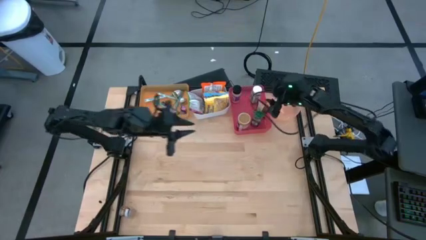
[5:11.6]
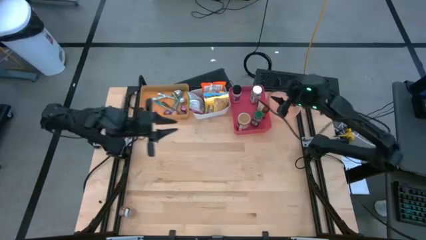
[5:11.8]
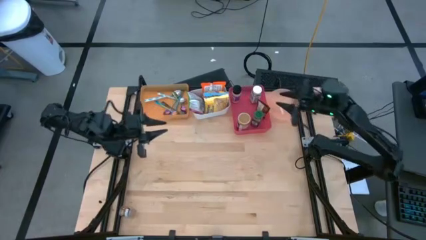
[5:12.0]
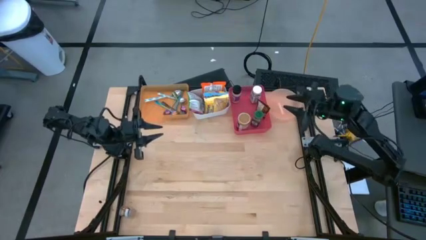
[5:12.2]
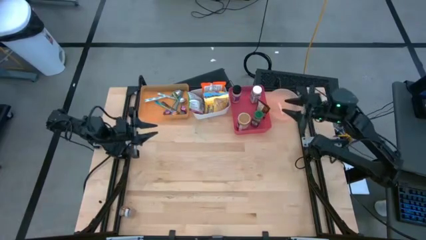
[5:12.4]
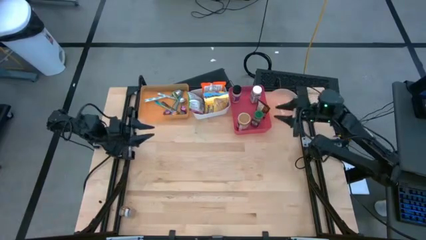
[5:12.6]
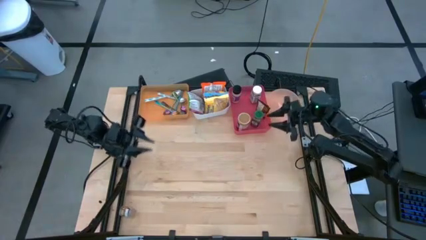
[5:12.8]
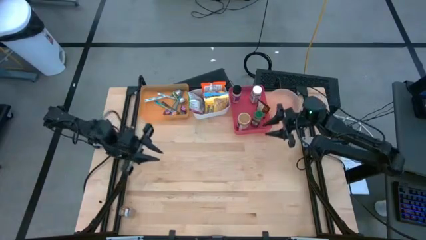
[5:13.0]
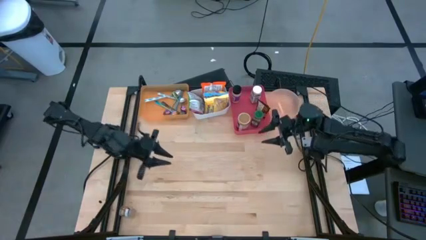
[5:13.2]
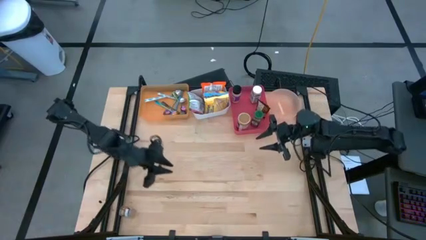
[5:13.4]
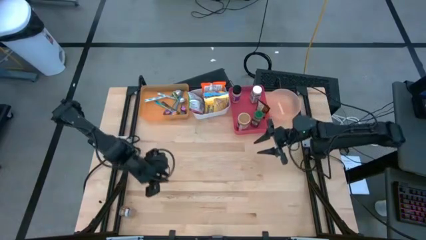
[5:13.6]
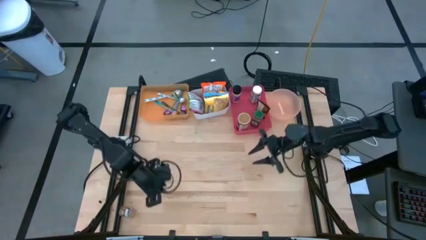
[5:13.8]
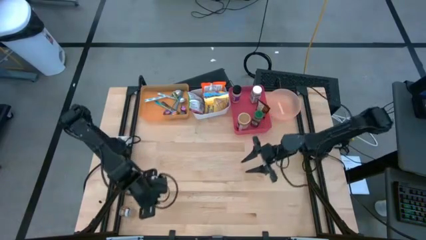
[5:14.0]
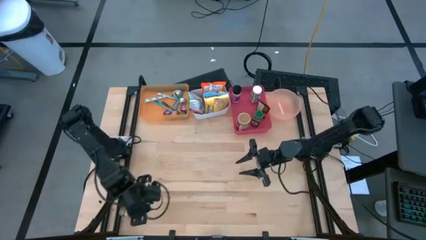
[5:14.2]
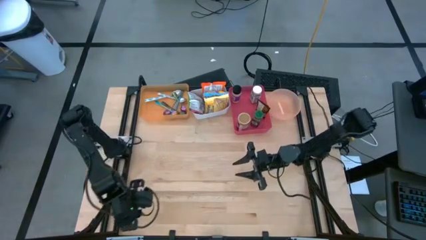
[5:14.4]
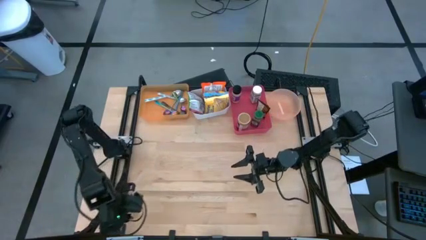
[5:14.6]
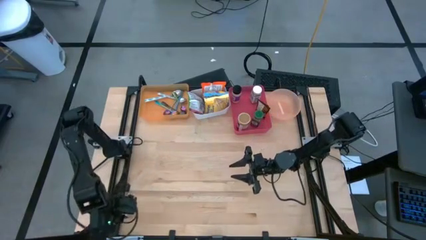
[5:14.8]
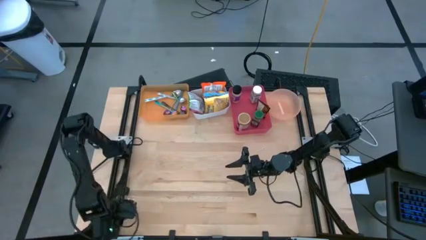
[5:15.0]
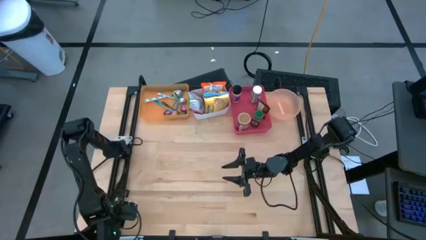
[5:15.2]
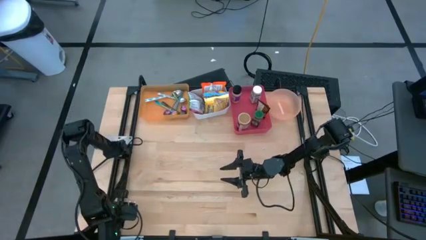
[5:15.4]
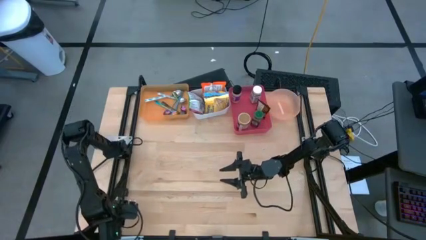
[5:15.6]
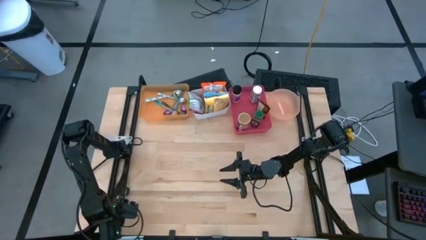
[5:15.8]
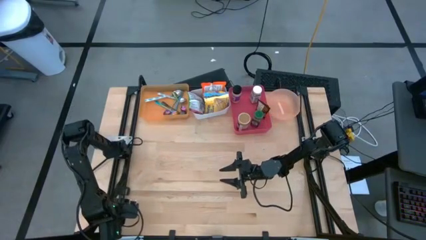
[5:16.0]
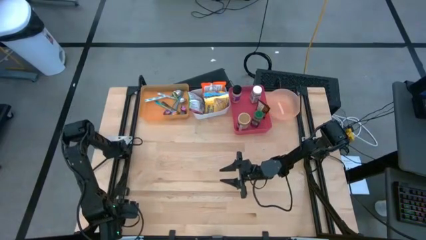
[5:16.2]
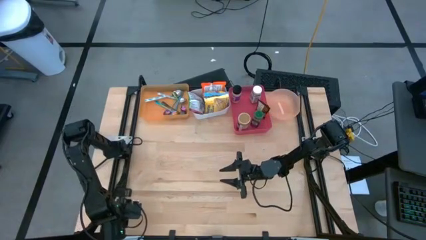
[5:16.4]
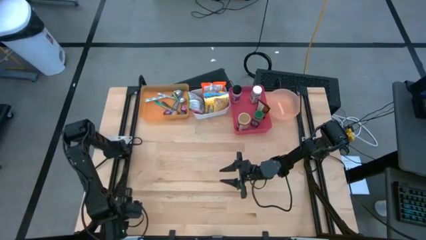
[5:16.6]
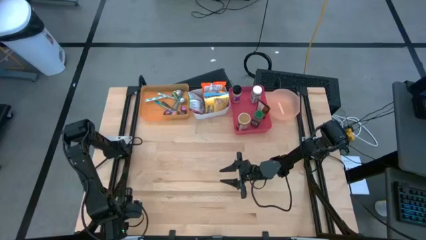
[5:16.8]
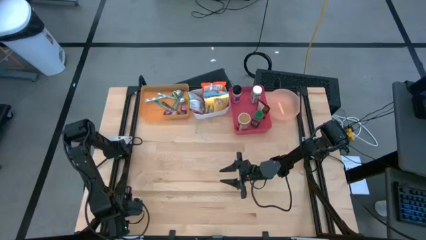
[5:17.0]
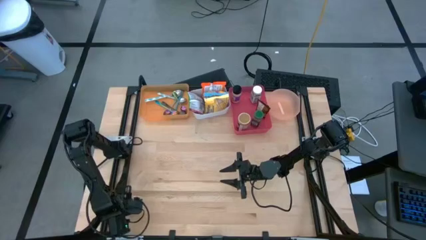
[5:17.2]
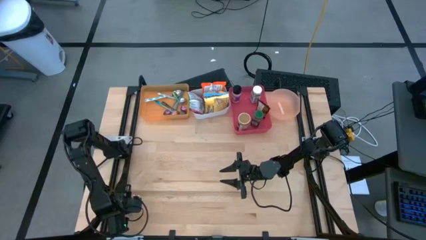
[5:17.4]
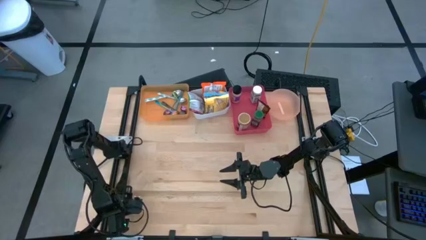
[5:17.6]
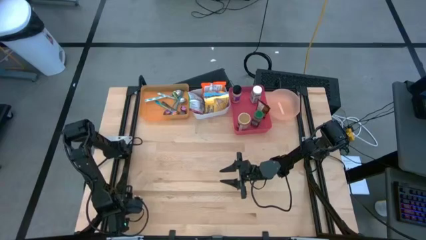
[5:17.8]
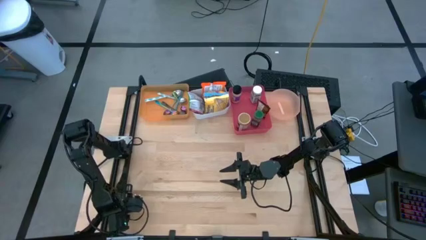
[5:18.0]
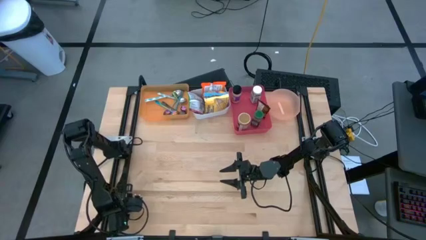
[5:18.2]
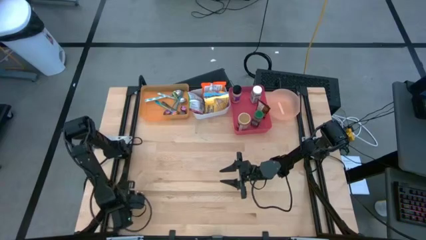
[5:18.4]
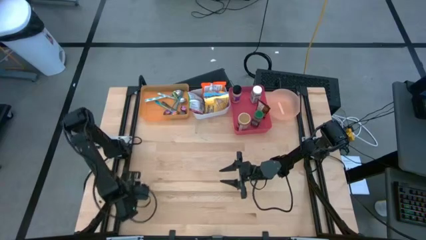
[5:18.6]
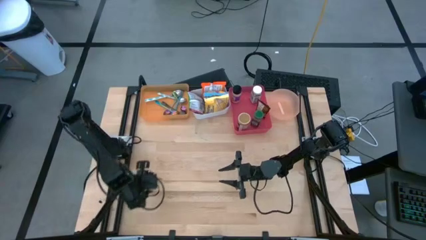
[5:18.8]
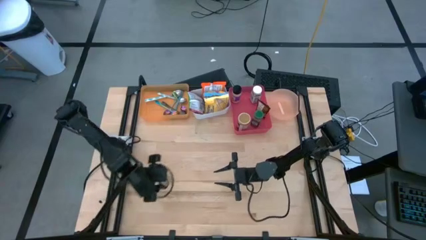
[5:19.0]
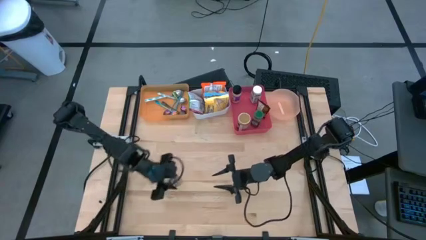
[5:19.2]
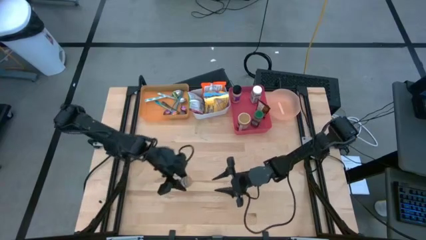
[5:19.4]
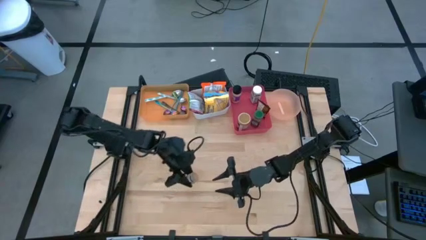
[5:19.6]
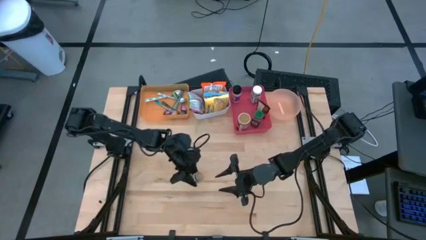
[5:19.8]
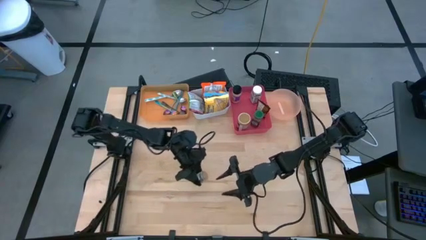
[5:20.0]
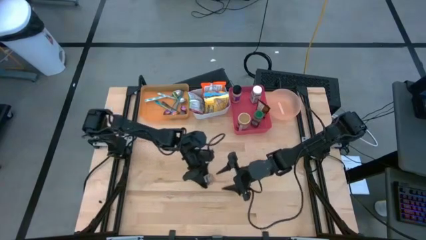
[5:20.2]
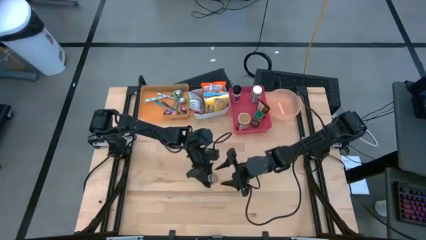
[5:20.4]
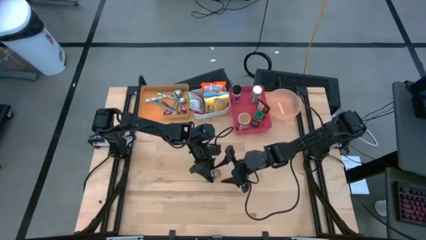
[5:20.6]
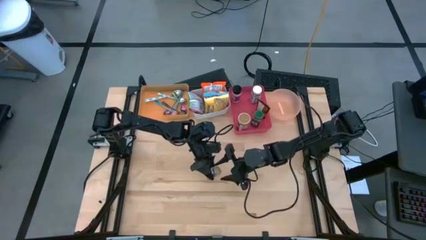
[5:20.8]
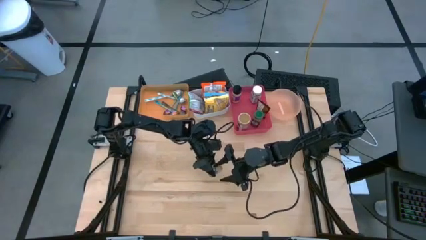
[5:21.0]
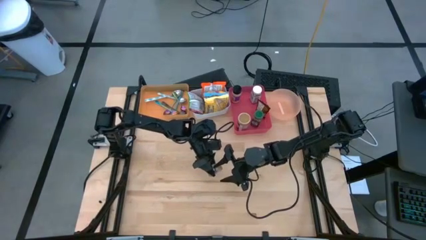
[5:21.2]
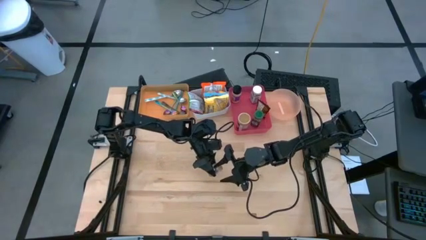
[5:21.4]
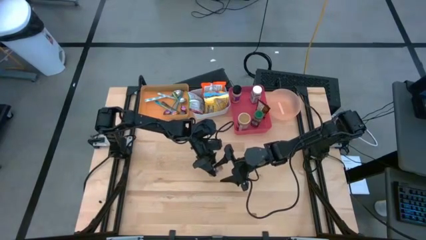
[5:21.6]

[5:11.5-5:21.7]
Task: Pick & Place Food Item
Put the brown seasoning bottle into the pink bin
